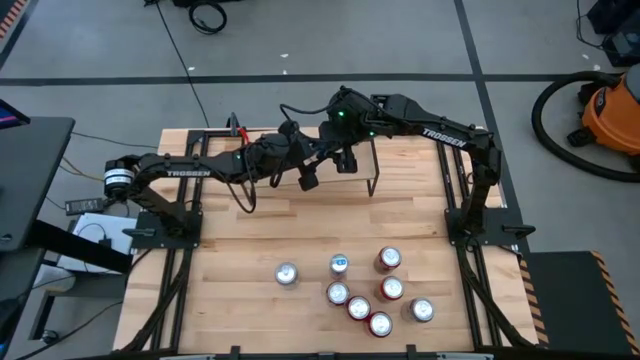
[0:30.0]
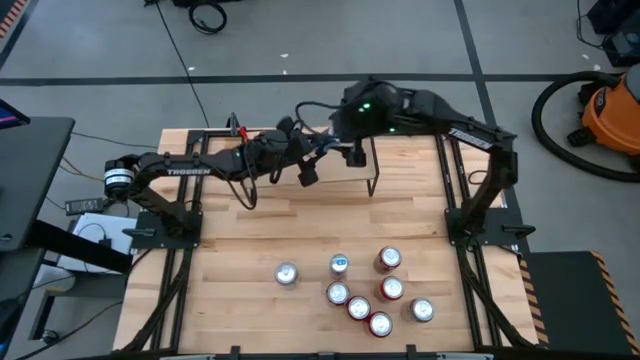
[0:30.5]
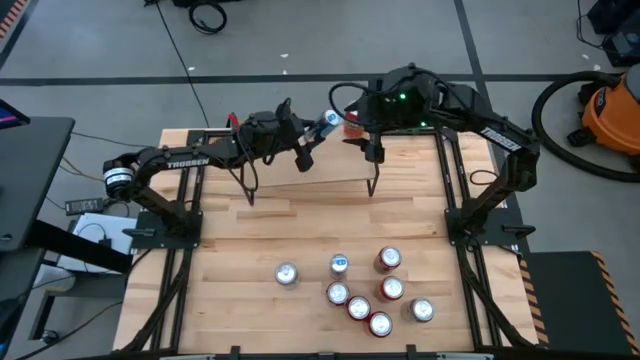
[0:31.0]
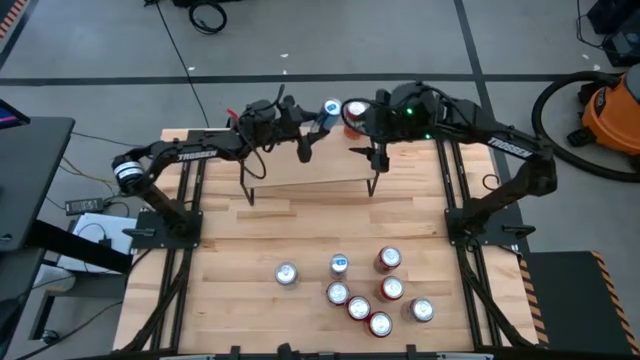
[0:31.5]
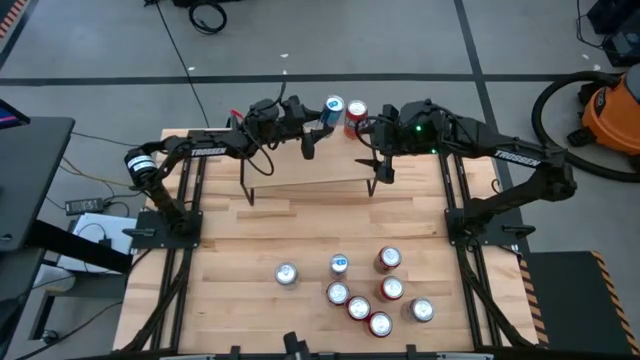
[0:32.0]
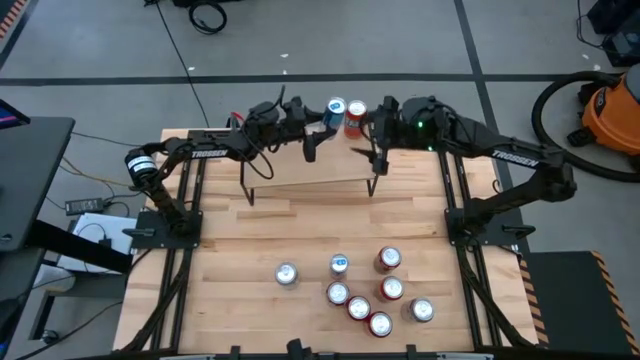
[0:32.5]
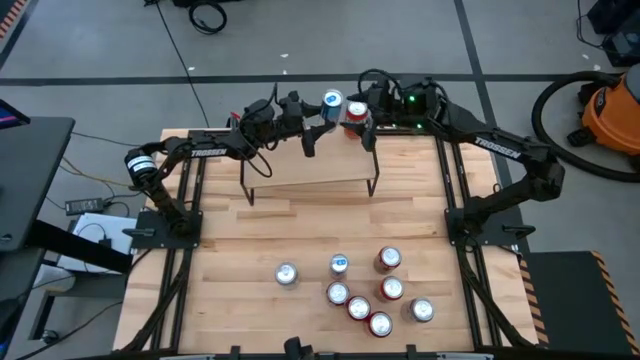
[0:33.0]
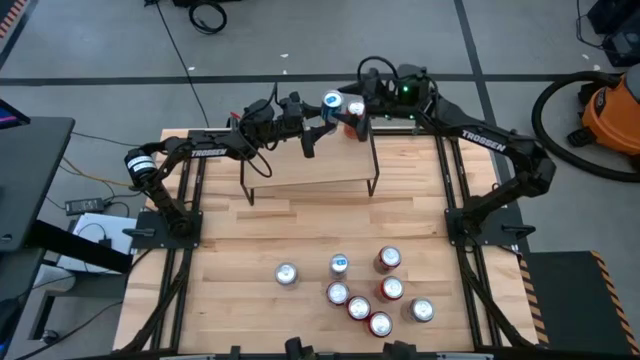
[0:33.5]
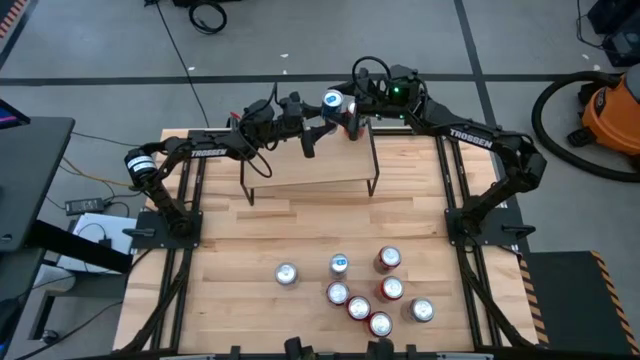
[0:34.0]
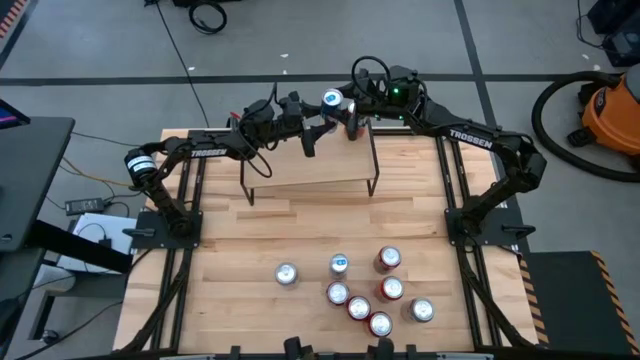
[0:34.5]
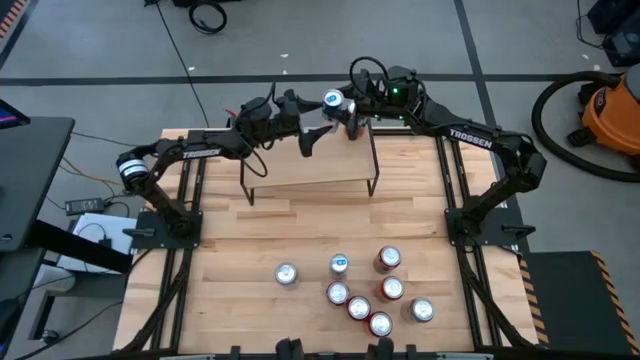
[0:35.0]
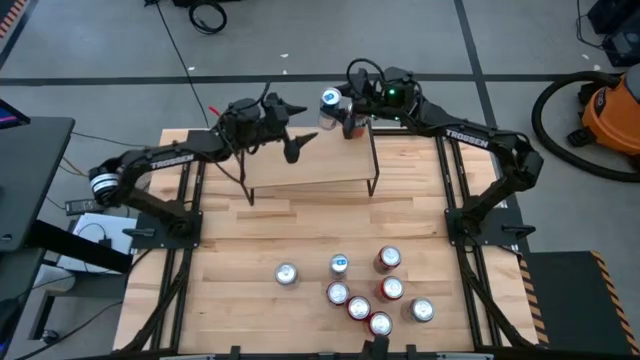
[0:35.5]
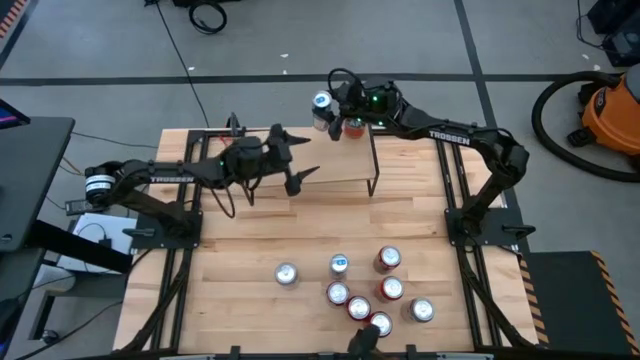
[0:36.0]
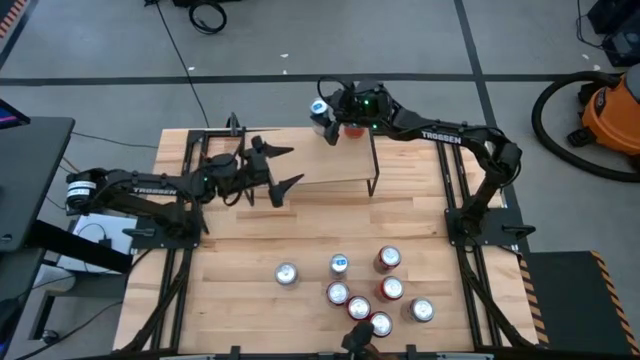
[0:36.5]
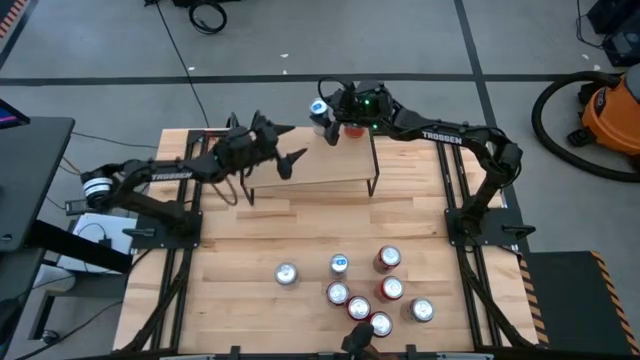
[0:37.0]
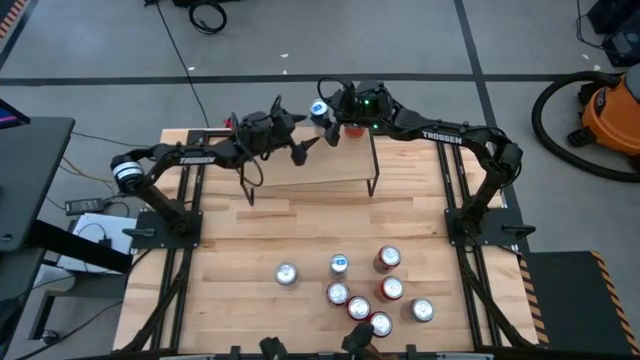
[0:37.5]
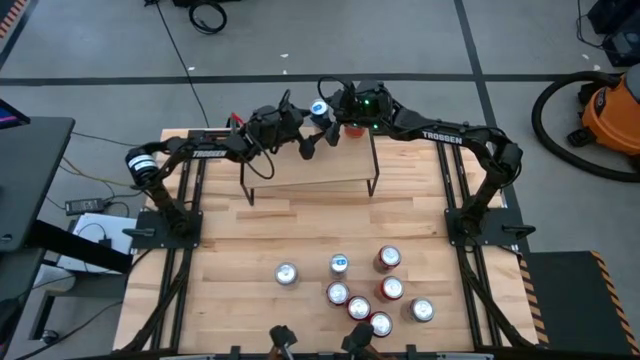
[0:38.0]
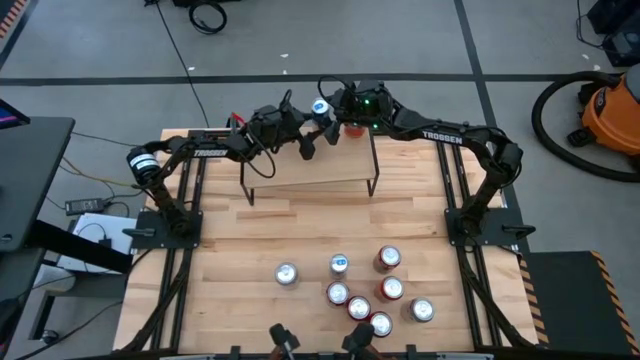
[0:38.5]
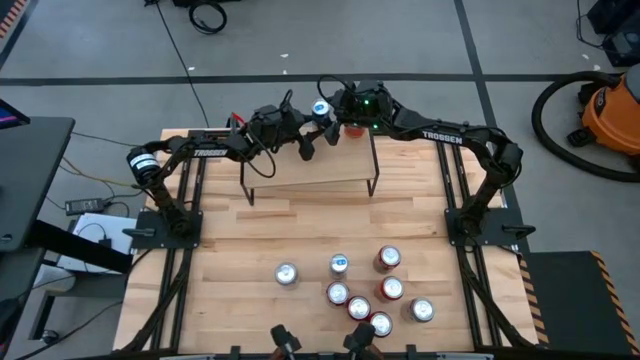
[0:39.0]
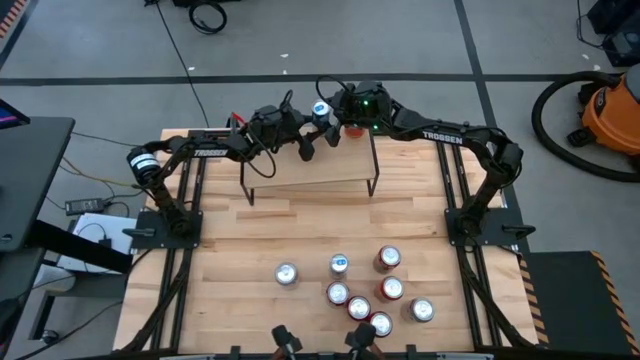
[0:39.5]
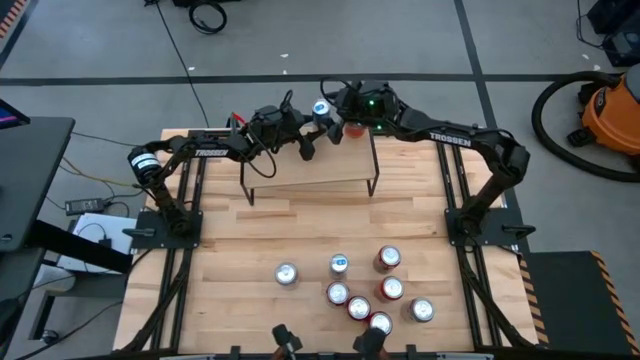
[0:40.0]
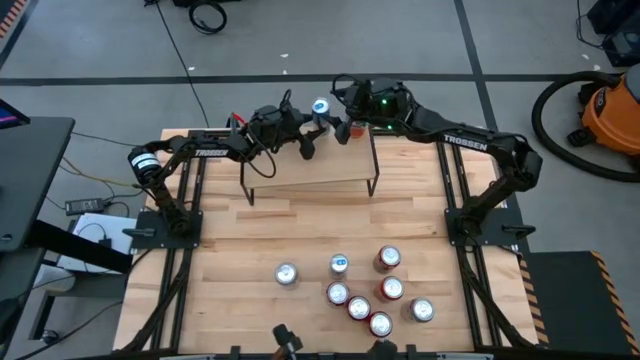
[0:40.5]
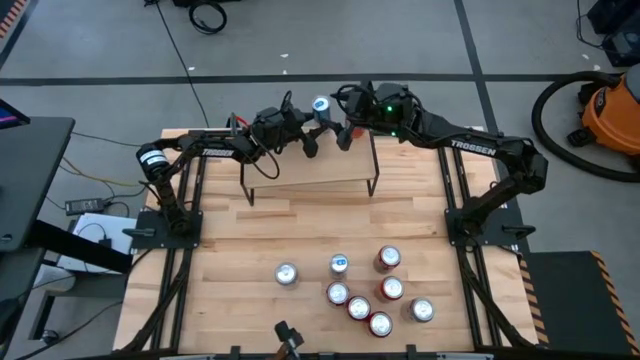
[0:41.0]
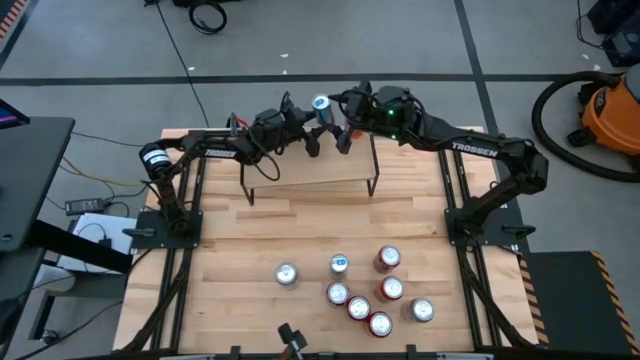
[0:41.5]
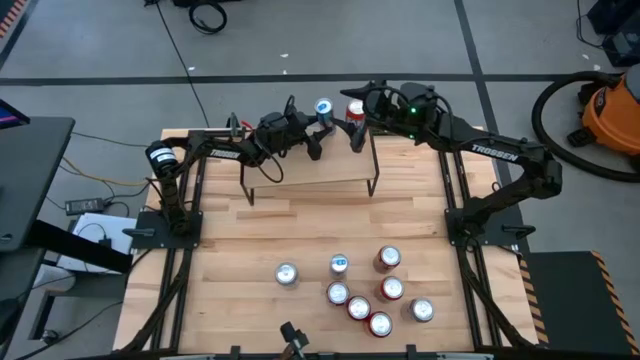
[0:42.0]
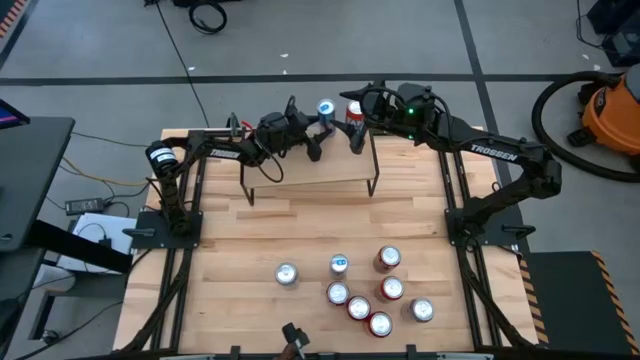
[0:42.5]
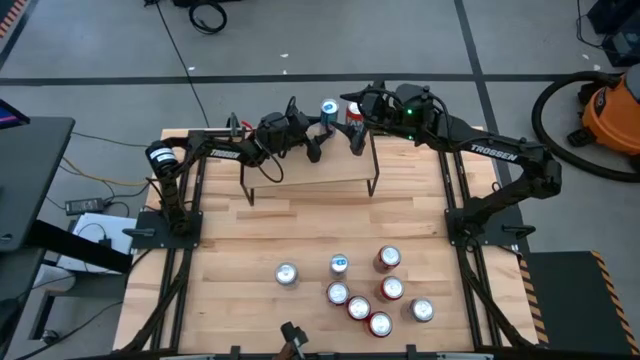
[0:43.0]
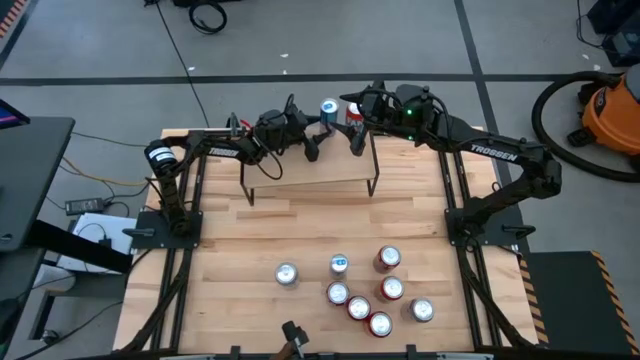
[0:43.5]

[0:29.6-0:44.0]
Task: Place canned beverage on shelf
Put the right blue soda can on the shelf

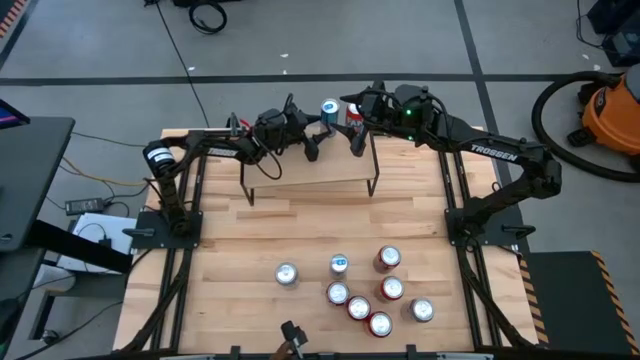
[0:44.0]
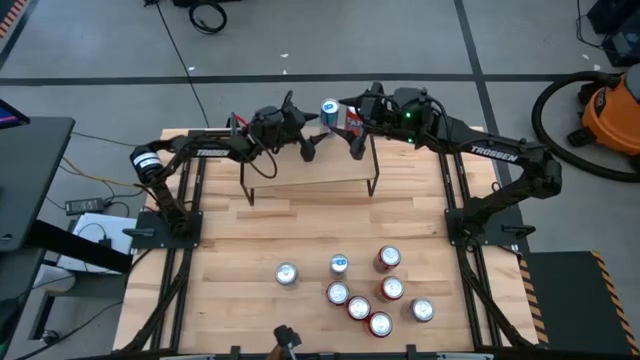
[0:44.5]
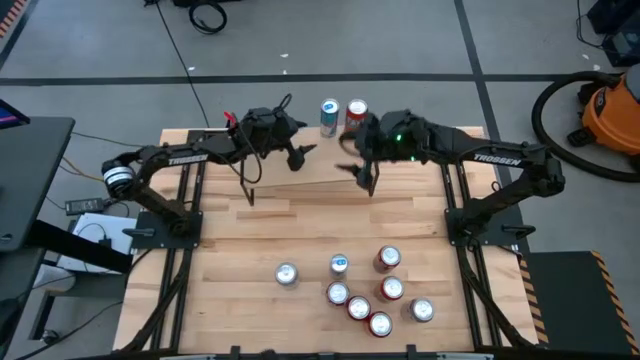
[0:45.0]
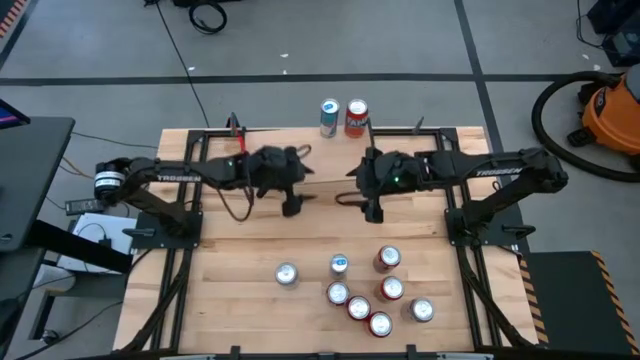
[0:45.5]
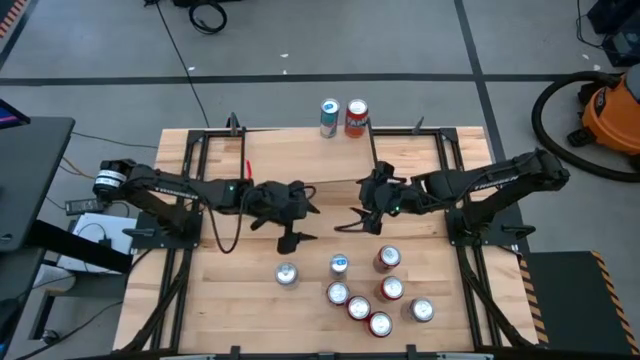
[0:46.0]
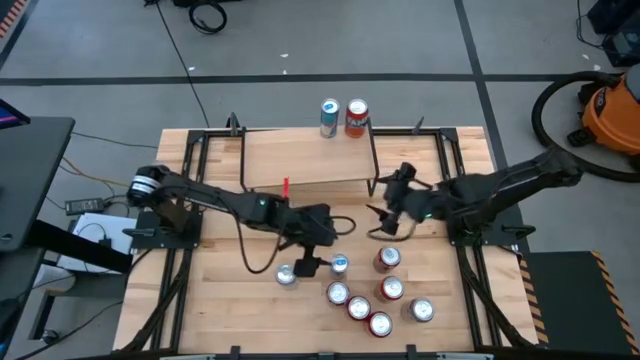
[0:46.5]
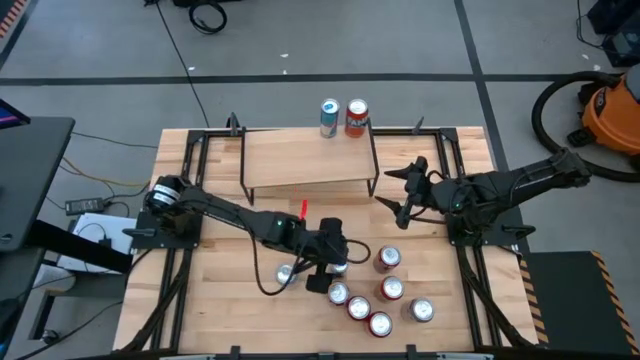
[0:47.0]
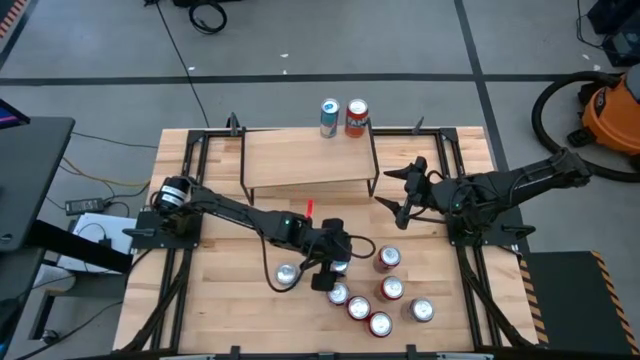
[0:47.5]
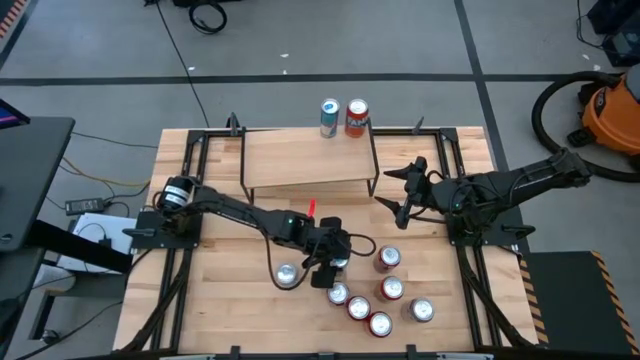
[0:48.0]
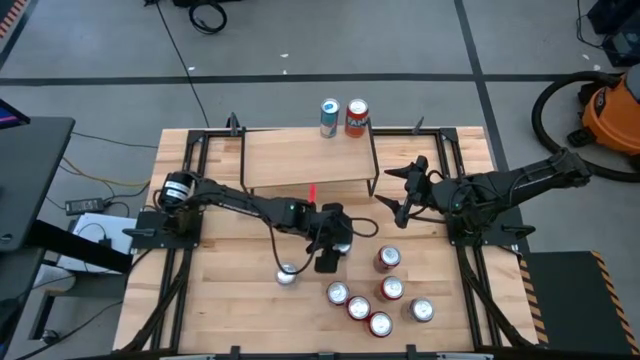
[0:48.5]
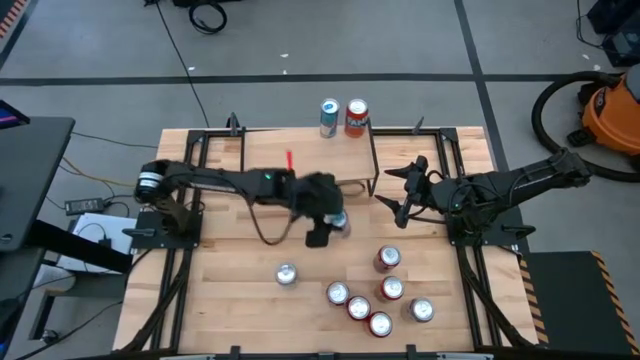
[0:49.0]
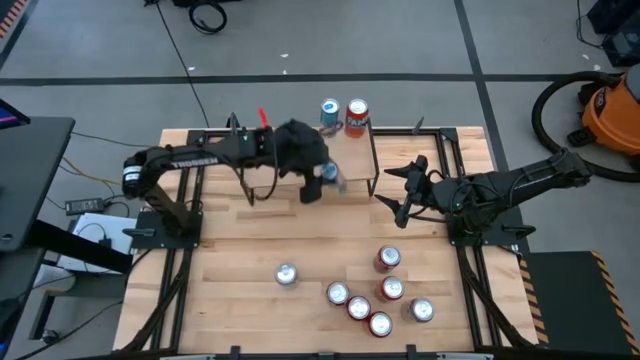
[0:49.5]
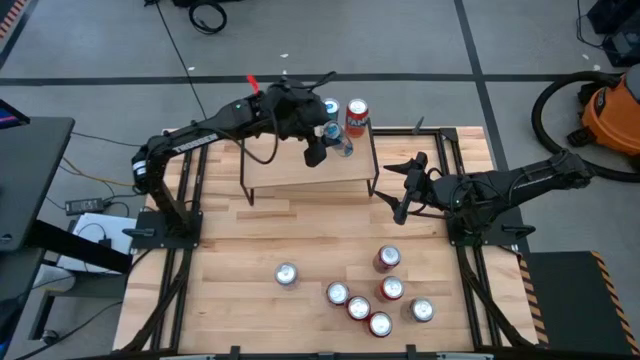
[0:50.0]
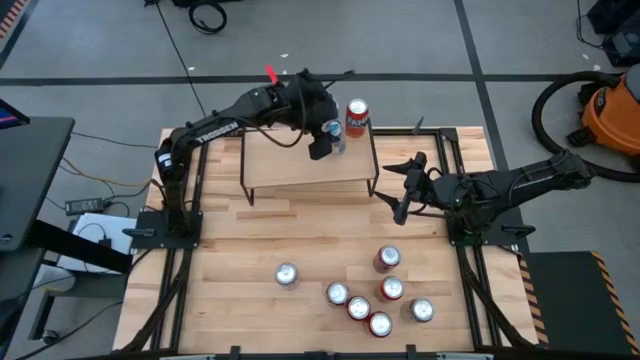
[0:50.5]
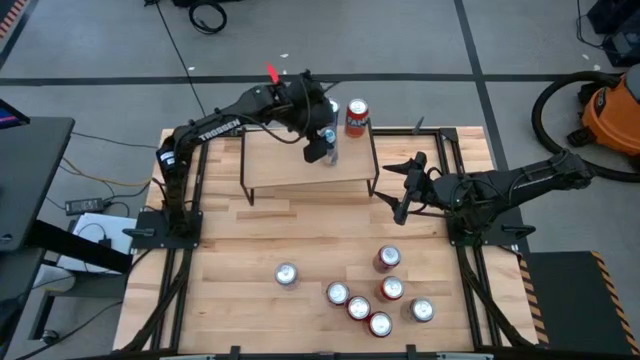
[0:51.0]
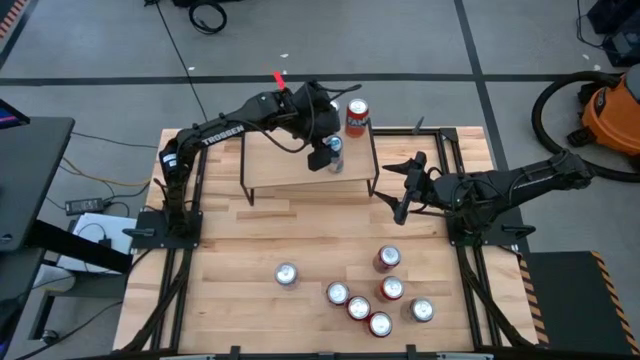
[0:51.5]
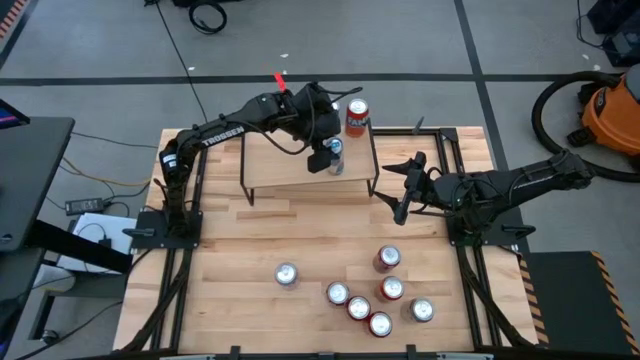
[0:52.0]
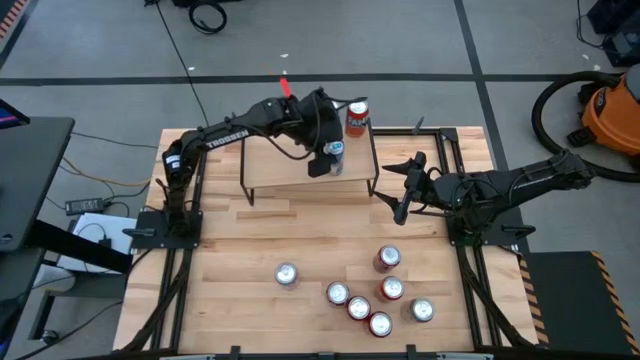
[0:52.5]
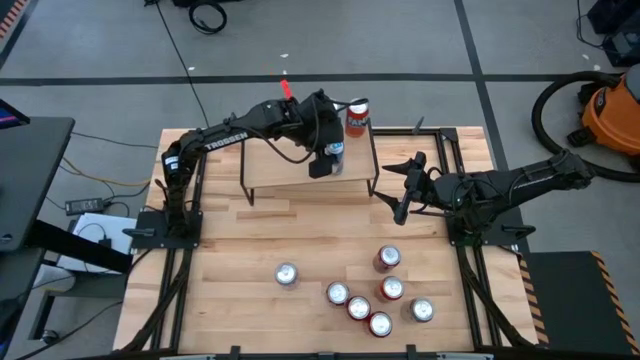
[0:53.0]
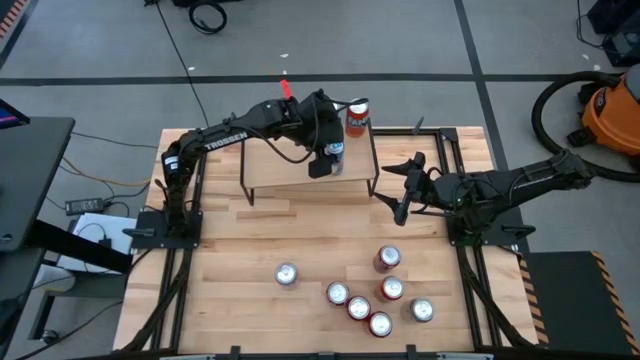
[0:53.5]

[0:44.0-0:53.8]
Put the blue soda can on the shelf aligned with the other blue soda can
